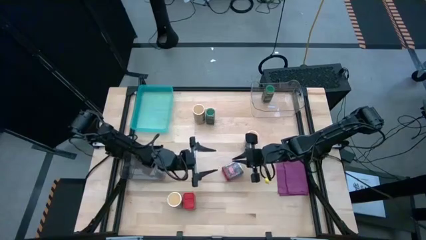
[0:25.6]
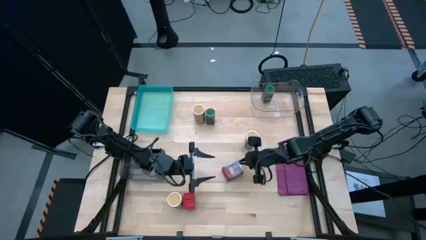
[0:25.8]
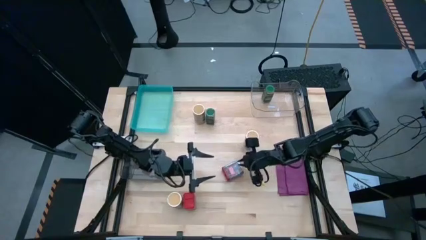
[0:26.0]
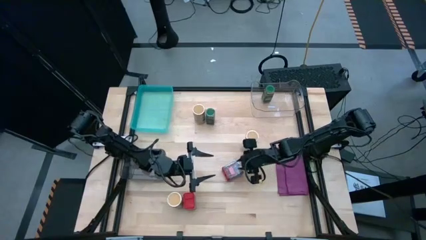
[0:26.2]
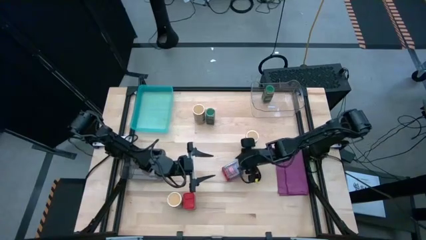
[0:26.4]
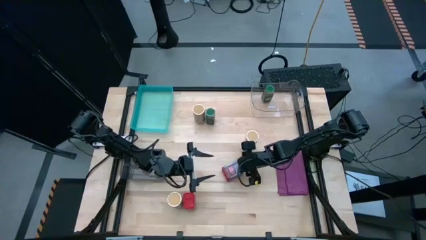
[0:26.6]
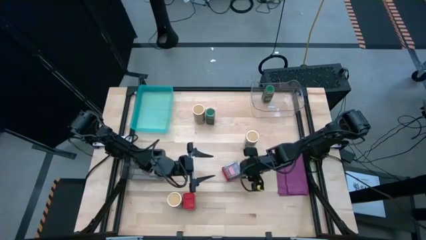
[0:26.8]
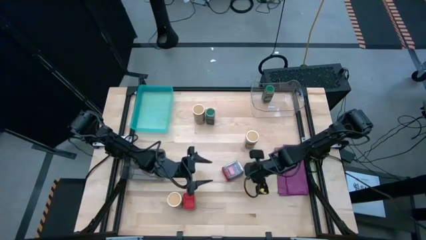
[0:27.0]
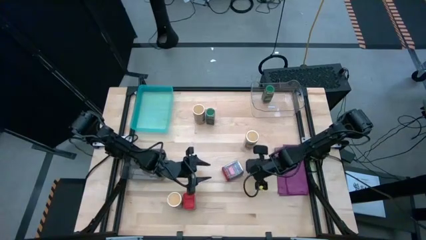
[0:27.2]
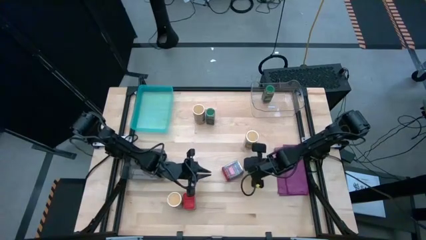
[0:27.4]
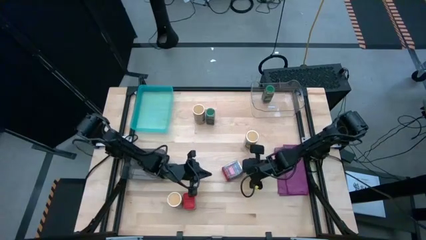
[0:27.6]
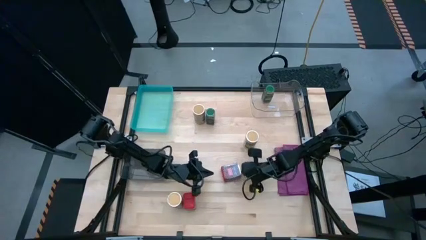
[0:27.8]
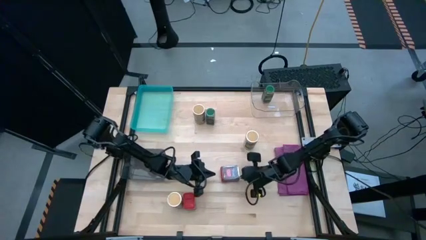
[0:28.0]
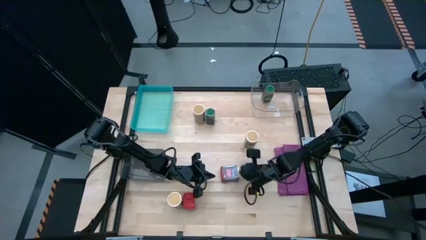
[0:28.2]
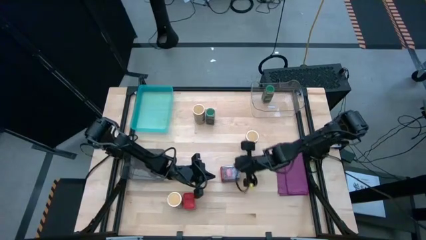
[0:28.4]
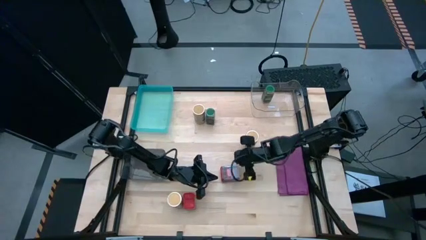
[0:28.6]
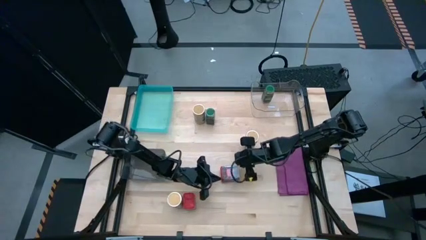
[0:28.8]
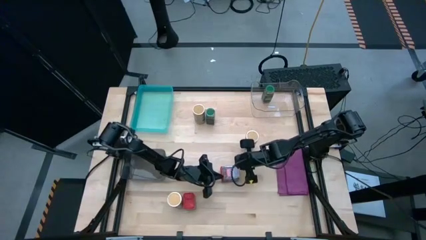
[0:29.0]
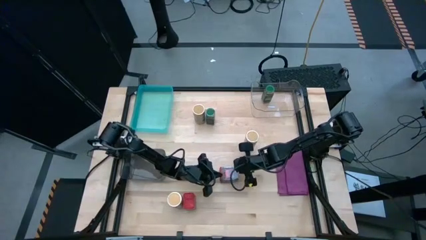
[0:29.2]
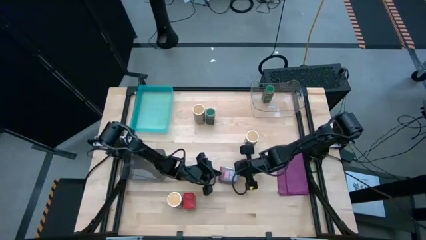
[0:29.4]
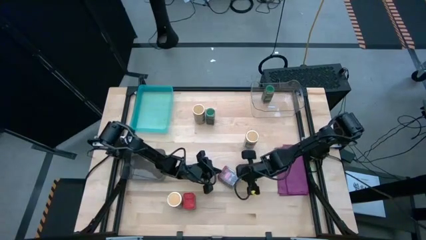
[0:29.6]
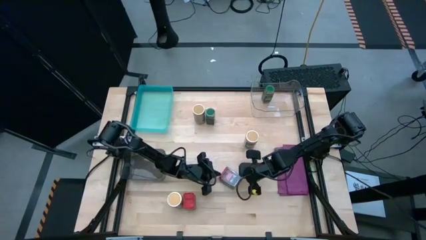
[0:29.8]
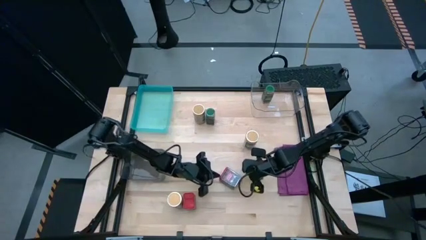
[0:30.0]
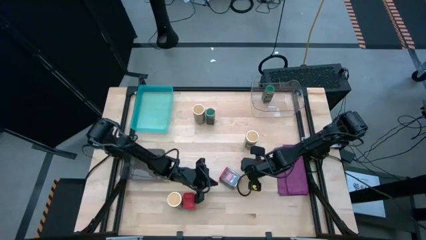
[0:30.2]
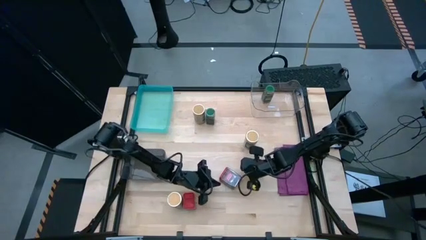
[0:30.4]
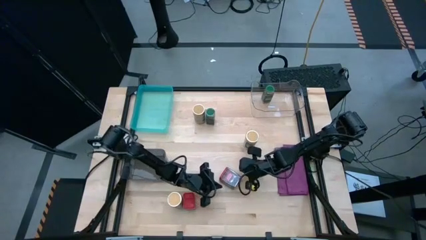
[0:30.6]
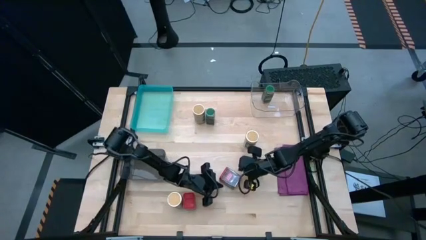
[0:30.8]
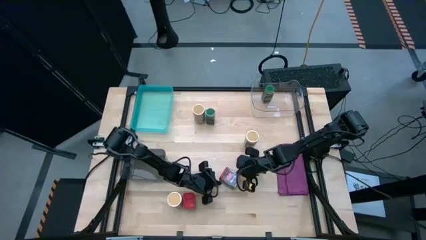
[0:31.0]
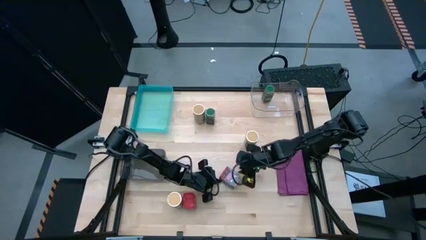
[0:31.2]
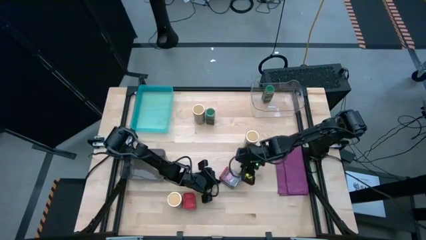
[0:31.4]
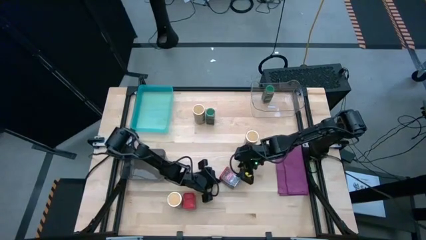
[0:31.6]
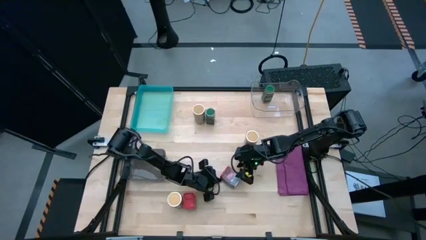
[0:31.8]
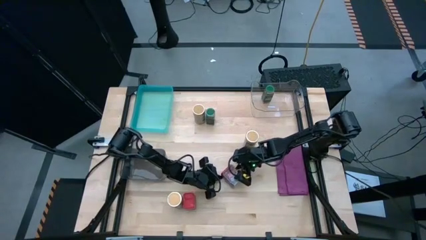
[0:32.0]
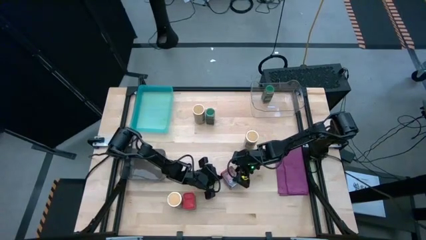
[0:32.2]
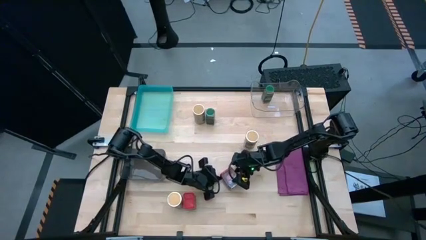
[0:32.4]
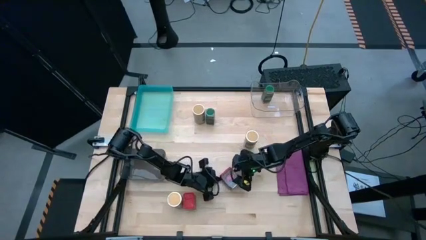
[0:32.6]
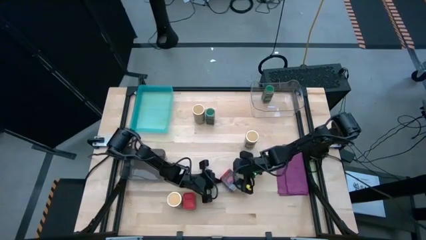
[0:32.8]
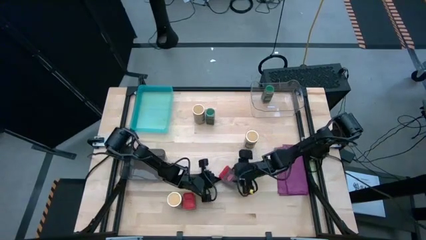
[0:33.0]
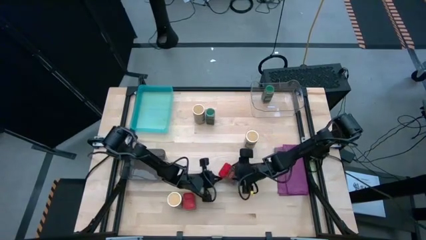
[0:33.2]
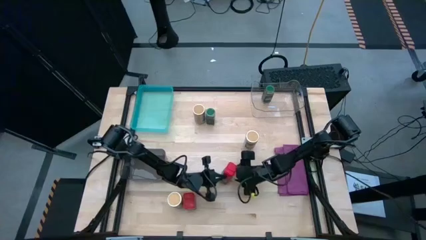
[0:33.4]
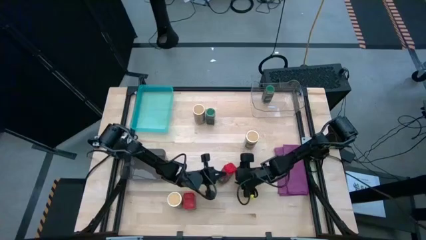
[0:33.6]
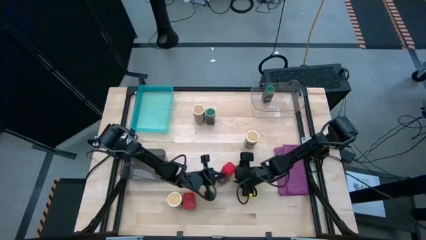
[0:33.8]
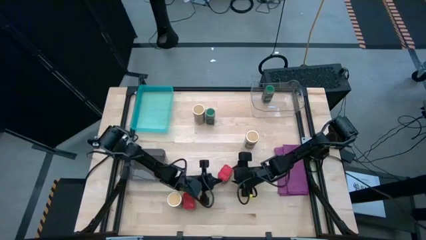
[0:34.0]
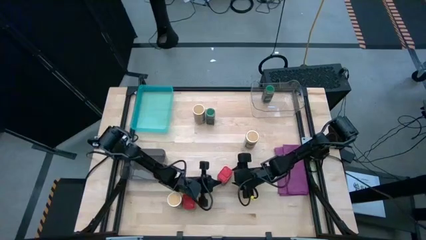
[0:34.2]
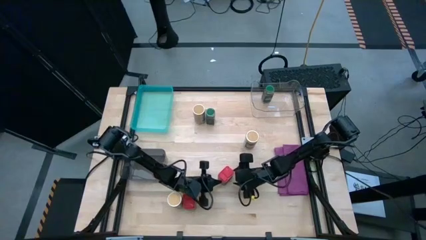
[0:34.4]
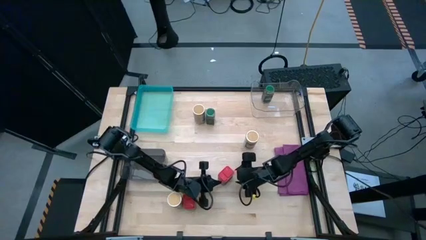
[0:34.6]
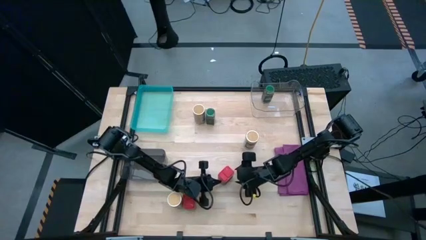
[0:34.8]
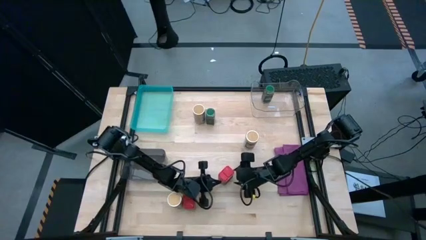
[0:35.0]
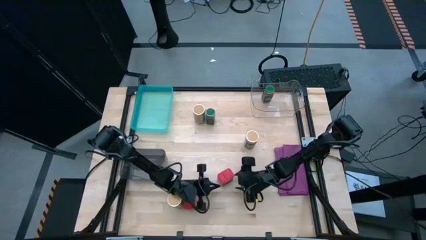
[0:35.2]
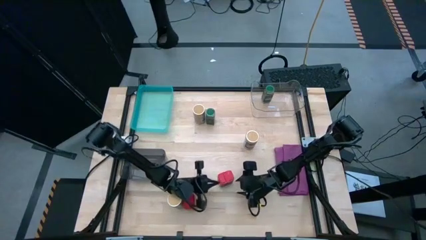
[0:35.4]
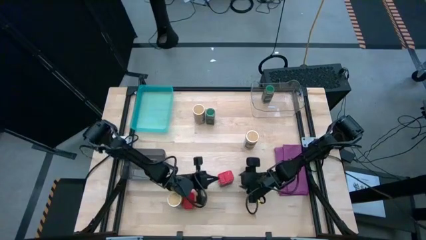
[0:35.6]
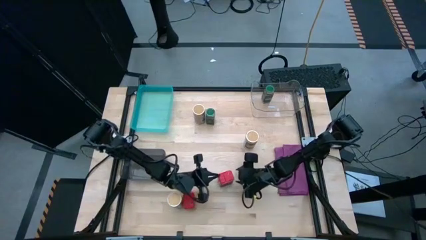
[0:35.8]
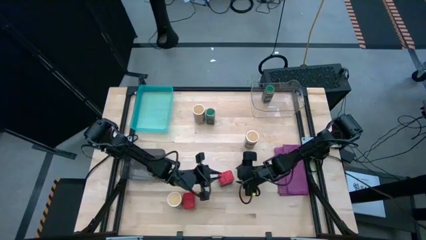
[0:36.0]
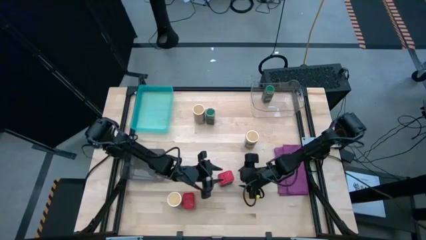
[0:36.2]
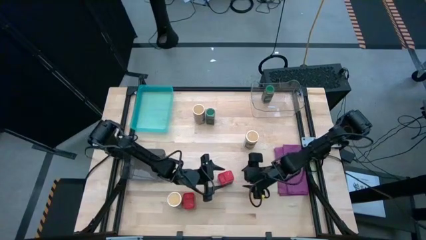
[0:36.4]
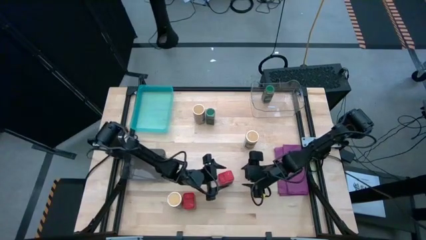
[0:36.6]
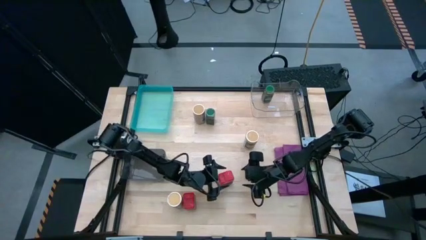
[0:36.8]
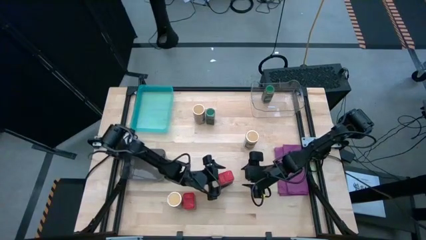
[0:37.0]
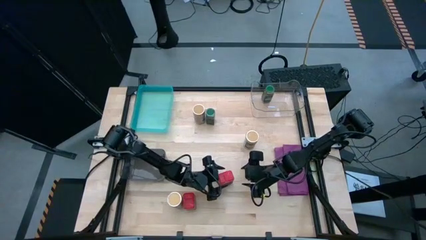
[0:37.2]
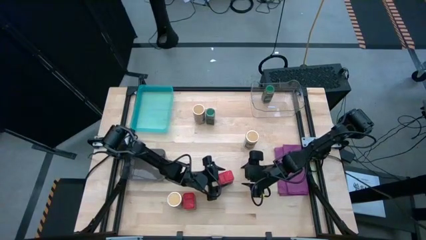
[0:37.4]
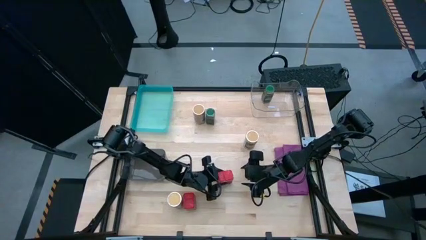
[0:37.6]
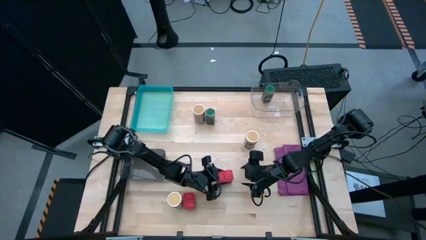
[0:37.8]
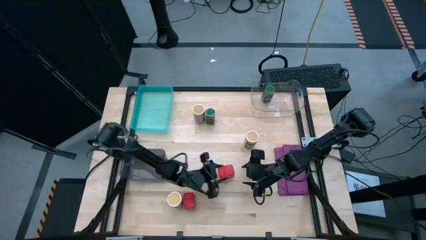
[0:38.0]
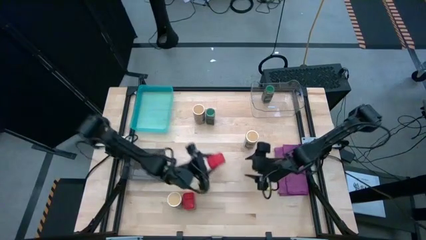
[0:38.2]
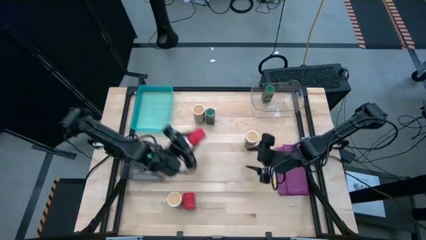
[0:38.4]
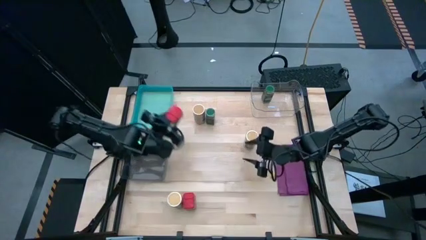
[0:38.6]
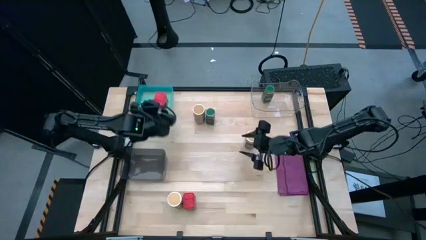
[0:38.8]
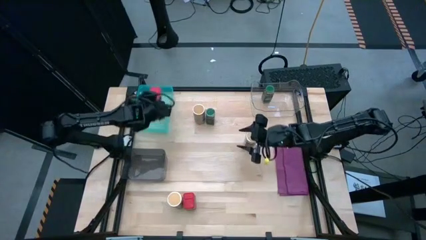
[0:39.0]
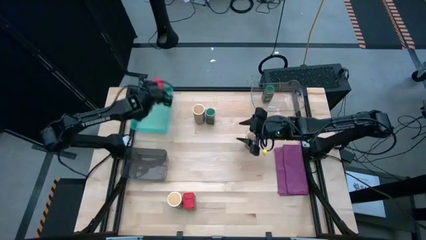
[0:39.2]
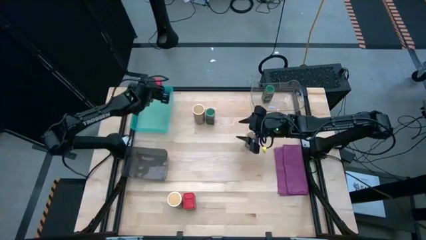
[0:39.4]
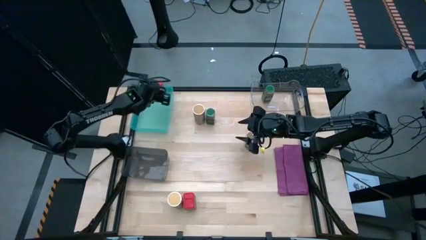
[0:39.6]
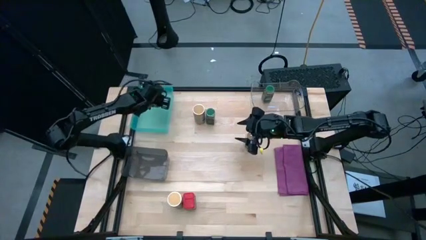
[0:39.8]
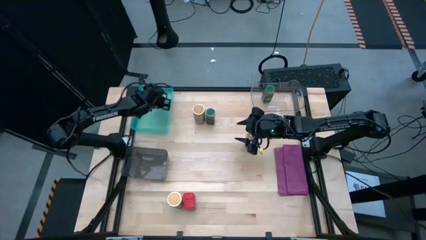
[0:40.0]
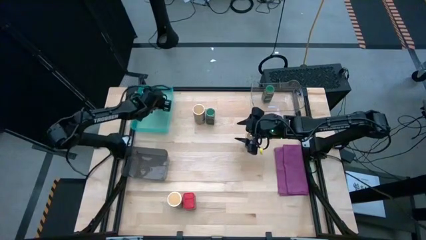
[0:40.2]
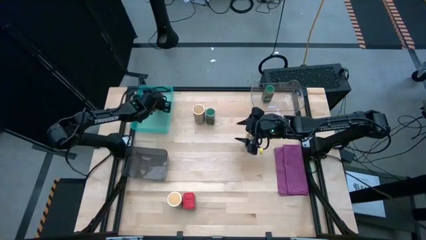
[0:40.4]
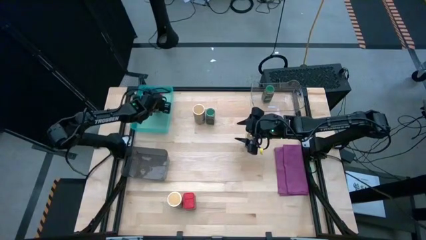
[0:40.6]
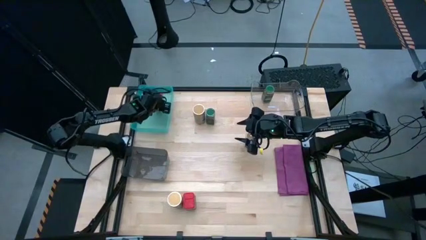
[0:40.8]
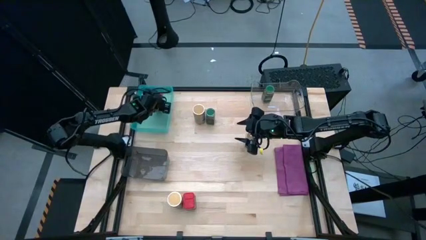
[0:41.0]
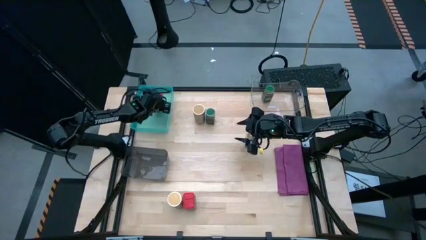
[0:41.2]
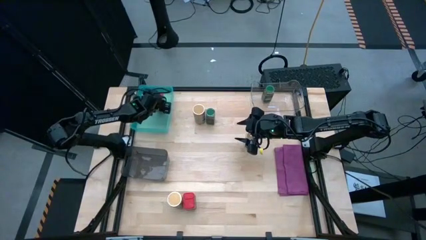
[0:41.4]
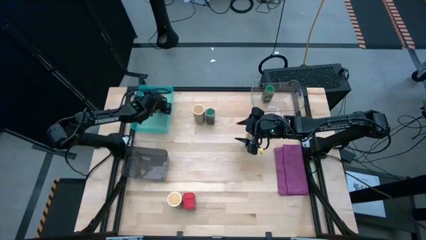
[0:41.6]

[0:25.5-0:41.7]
Task: Sort spices by type
Put the top red seasoning can into the blue bin
